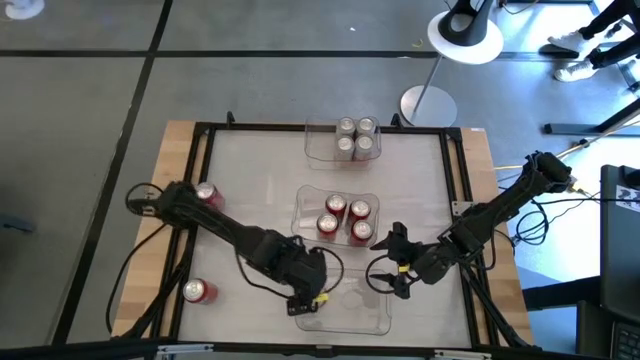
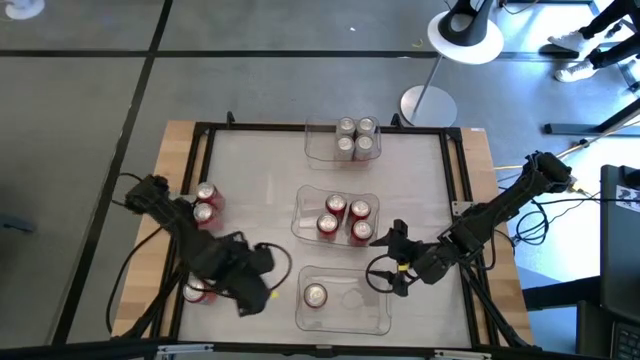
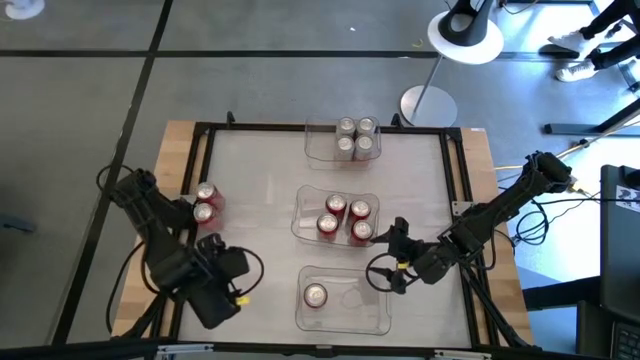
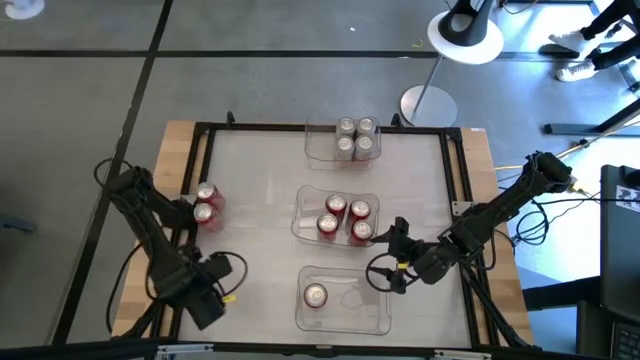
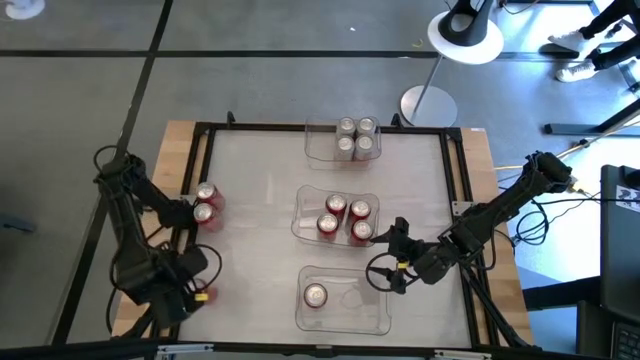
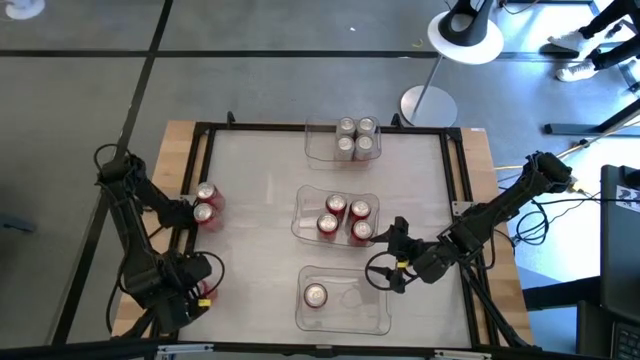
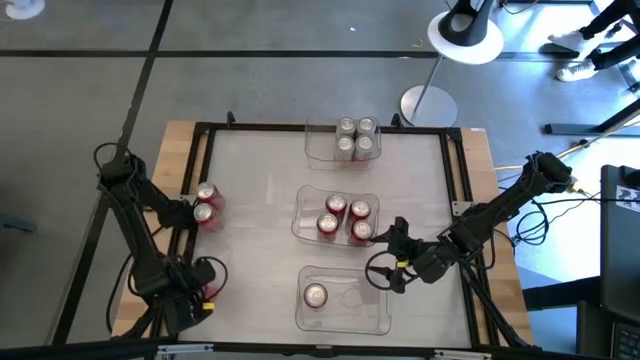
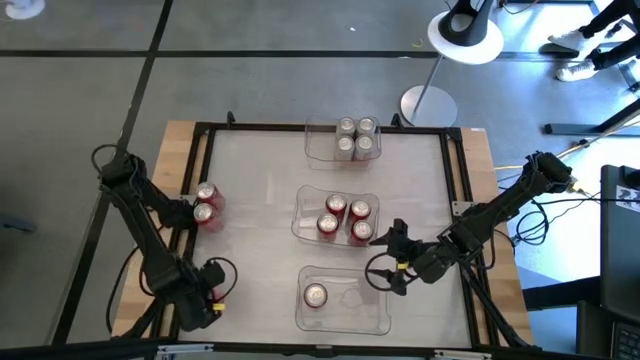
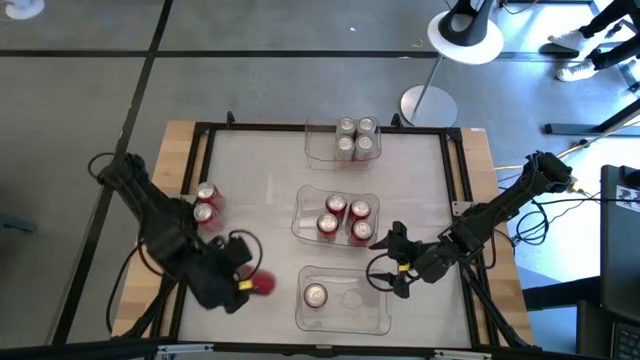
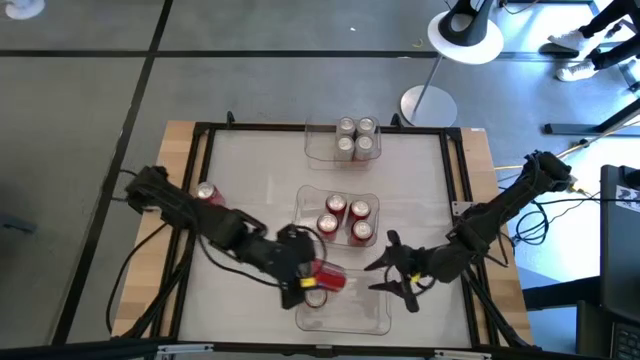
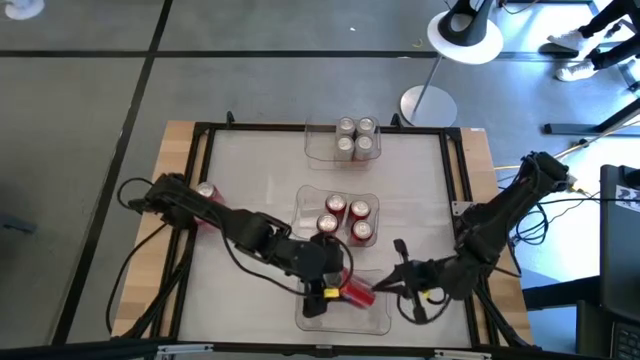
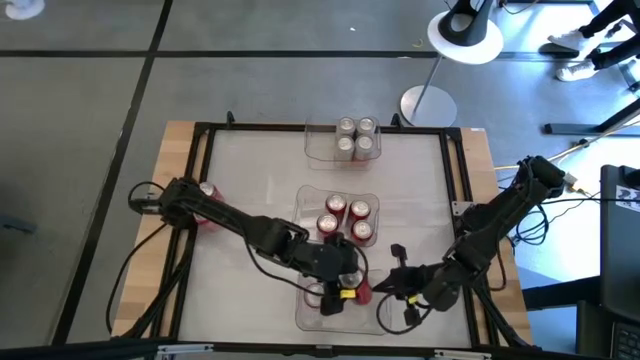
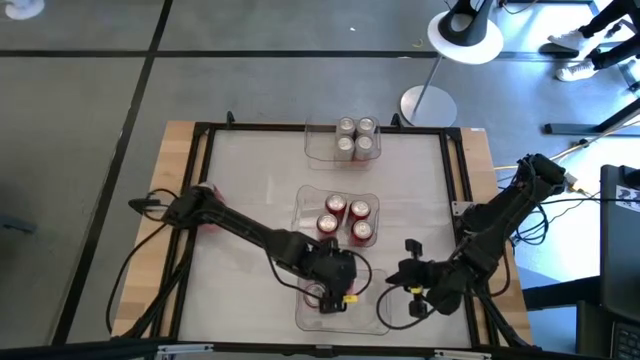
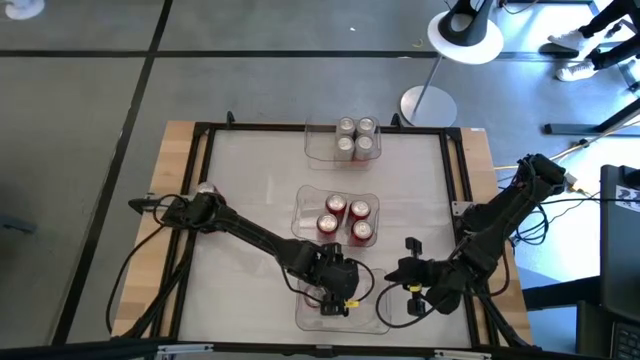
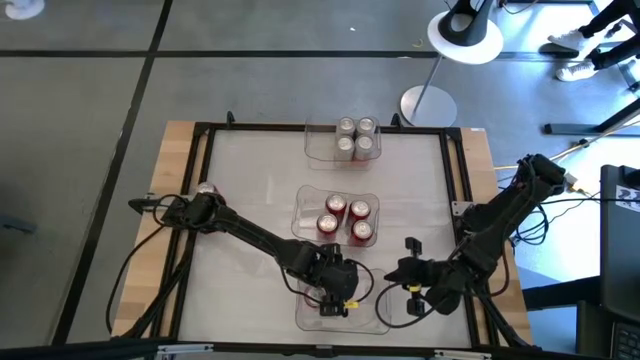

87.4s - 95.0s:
Task: Sort soda cans
Put the bottom red soda can into the bottom transparent bin

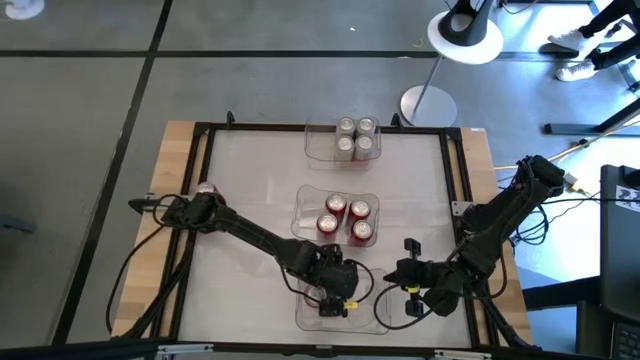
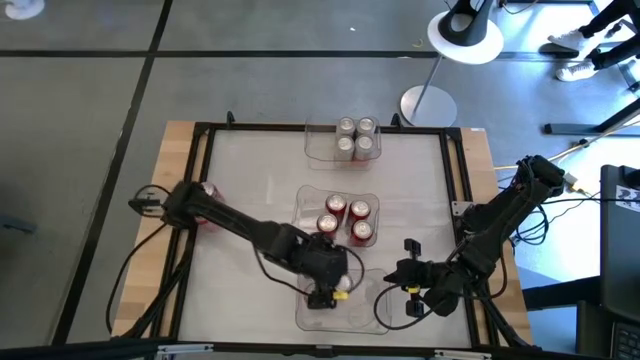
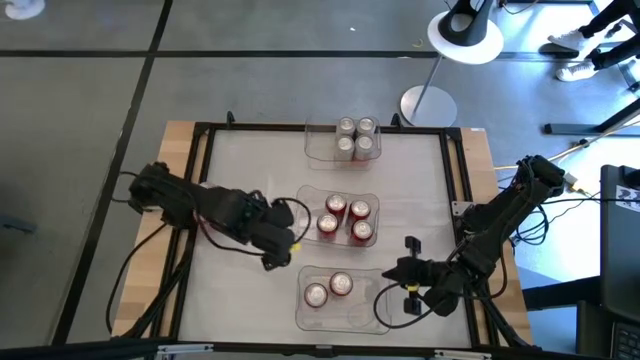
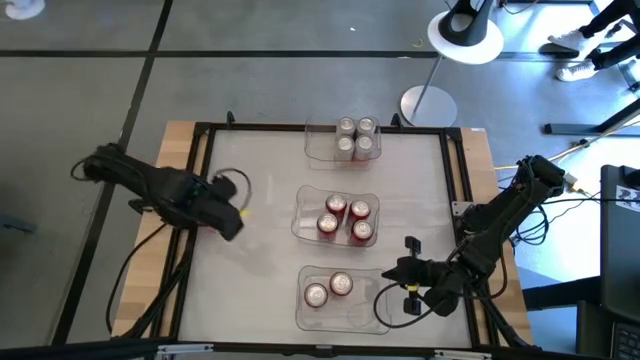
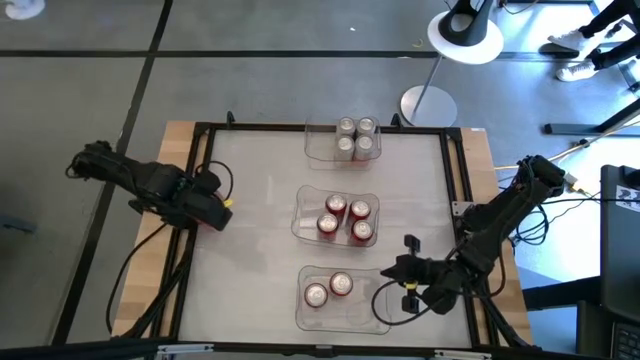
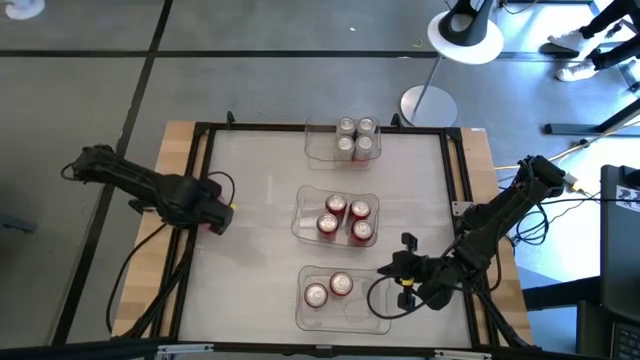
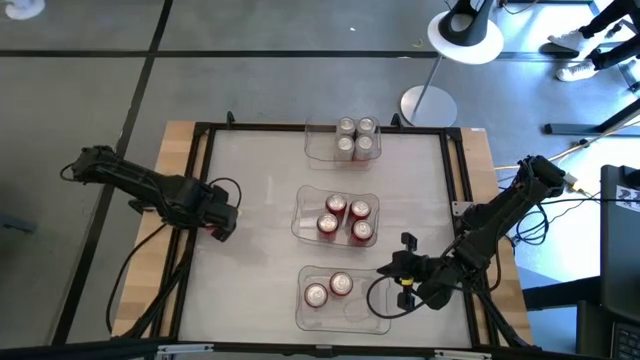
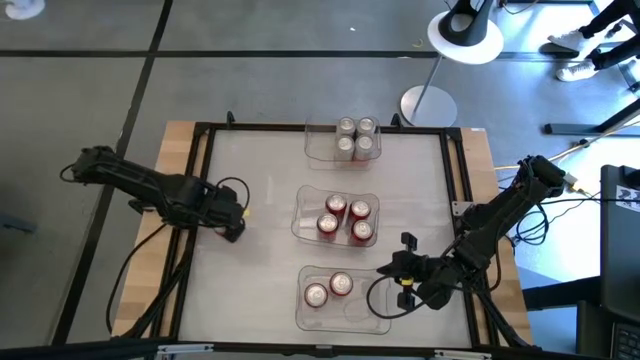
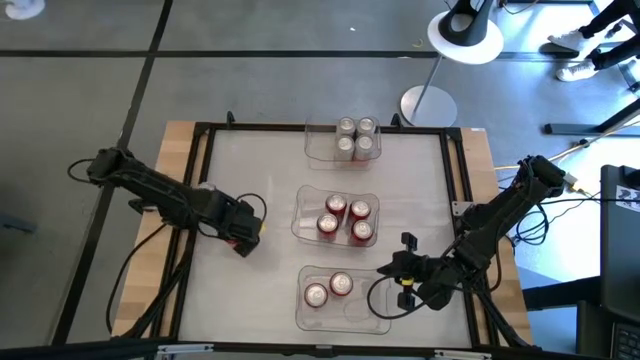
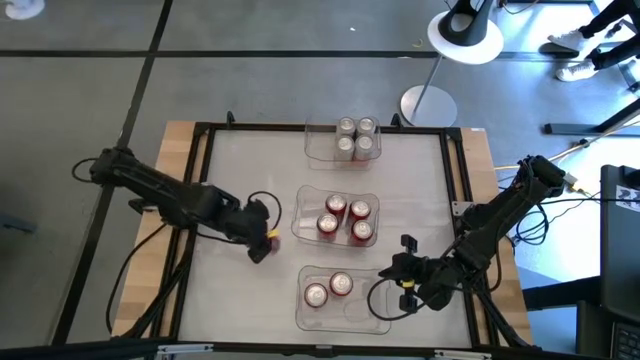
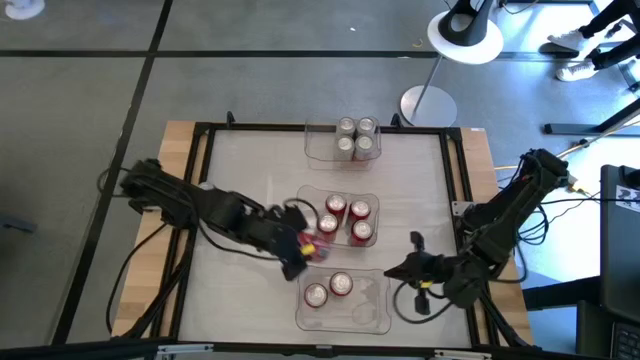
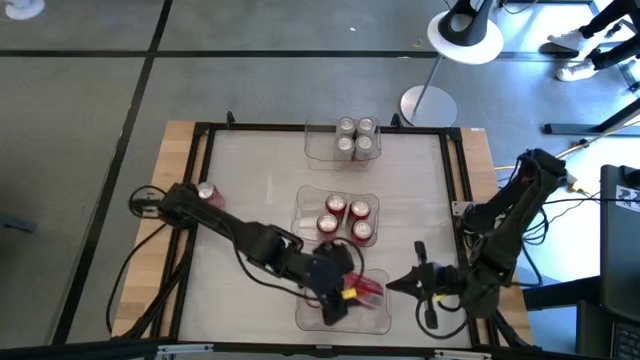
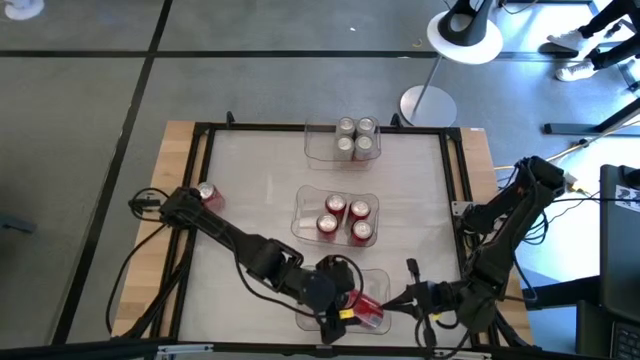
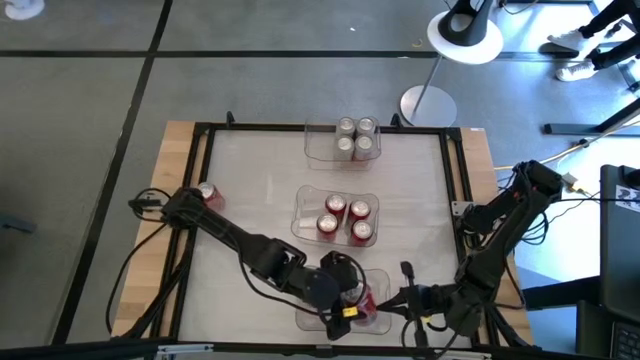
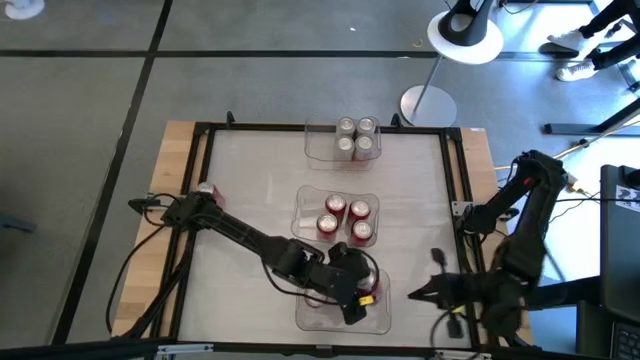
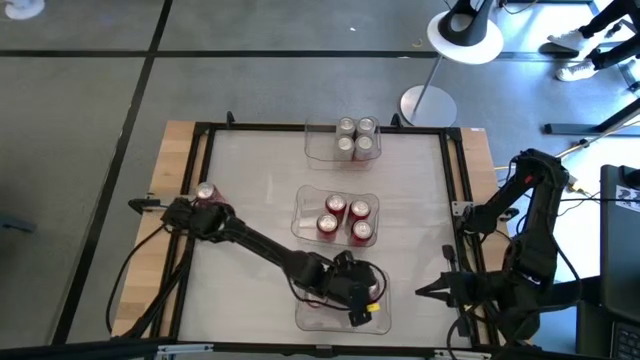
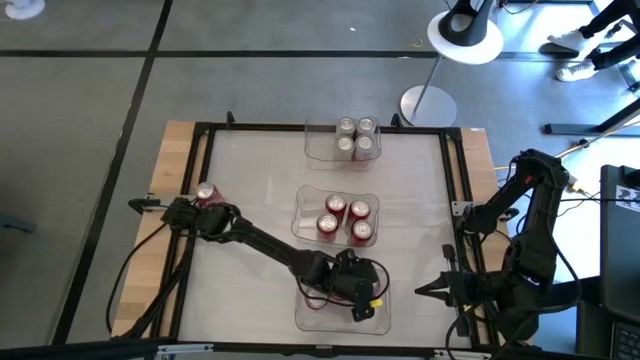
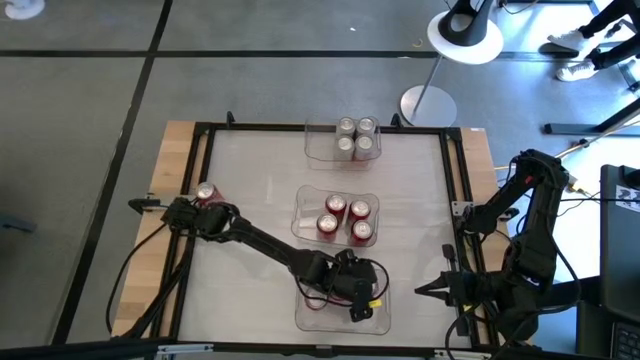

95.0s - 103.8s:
Put the bottom red soda can into the bottom transparent bin

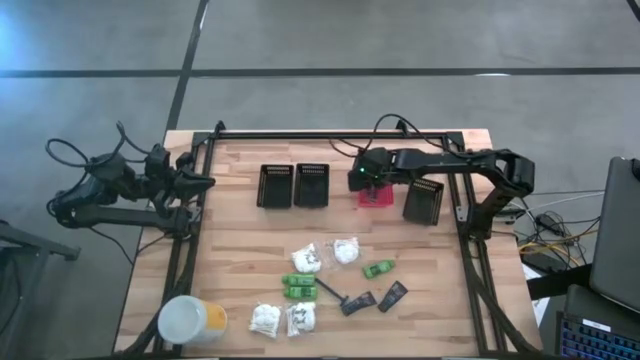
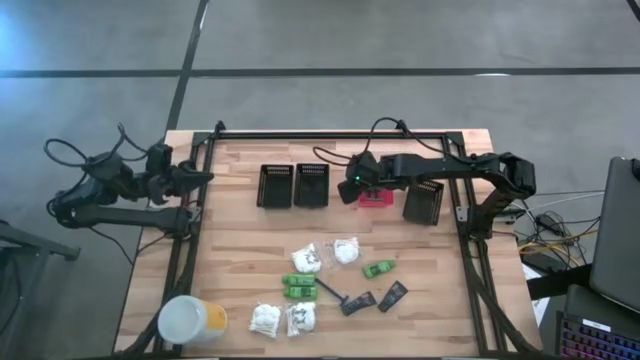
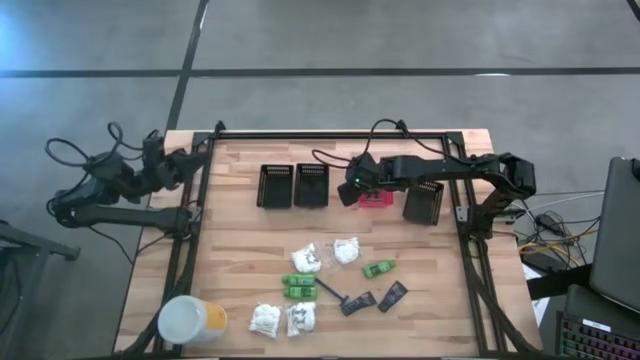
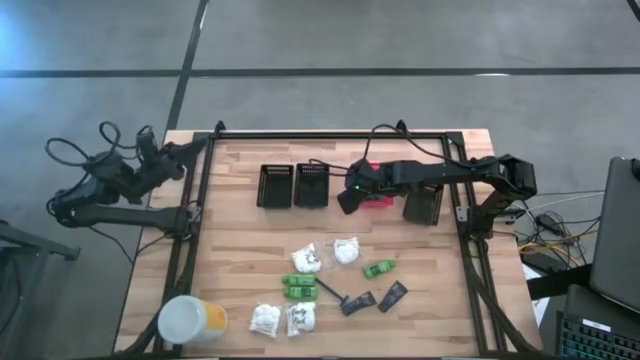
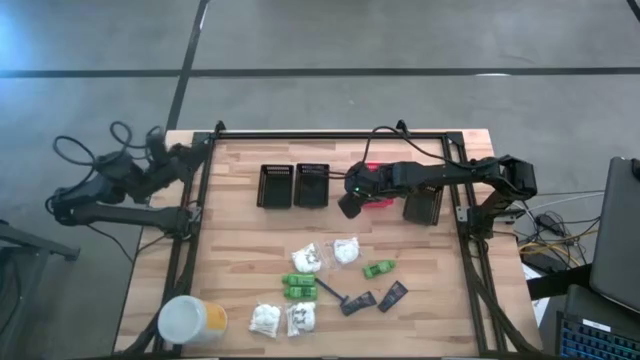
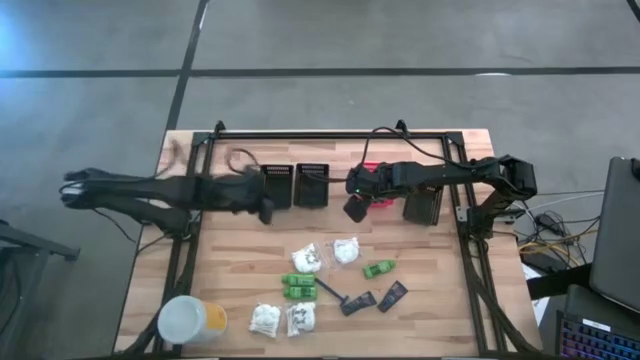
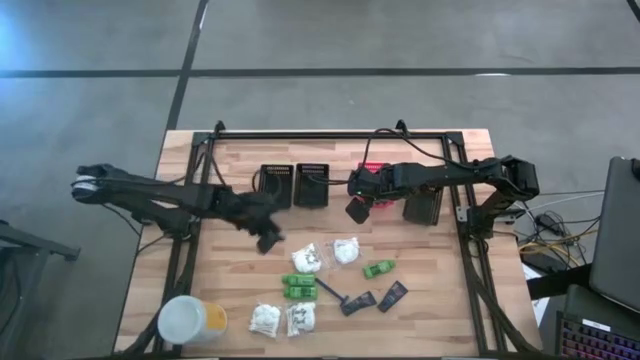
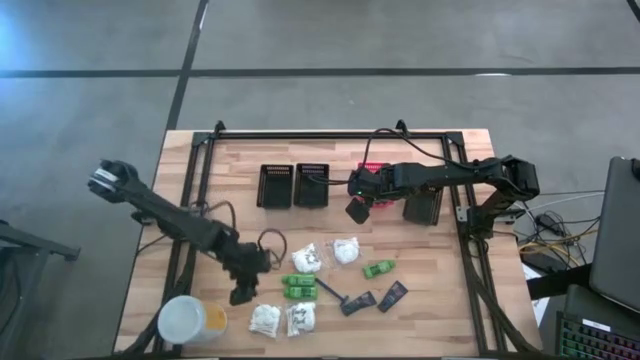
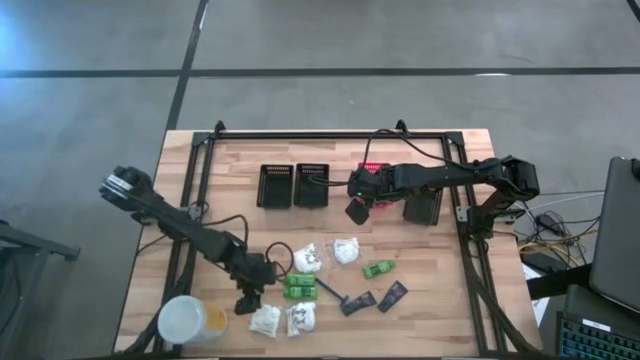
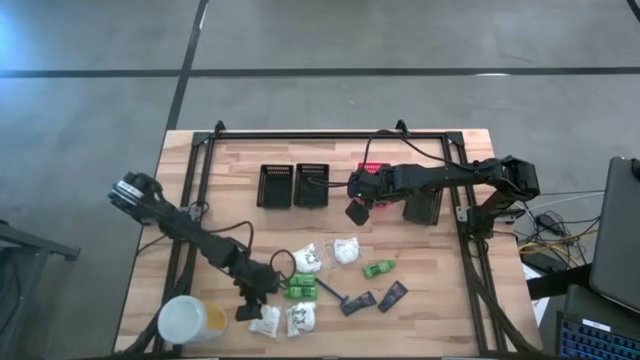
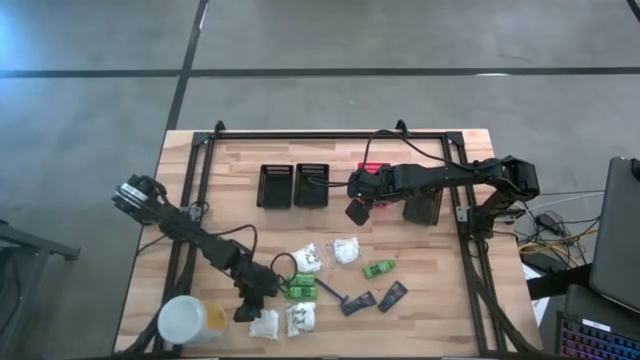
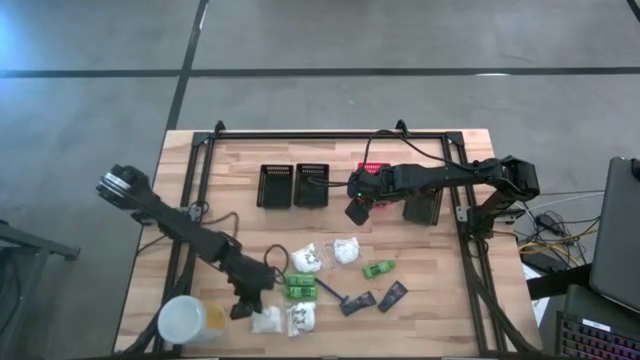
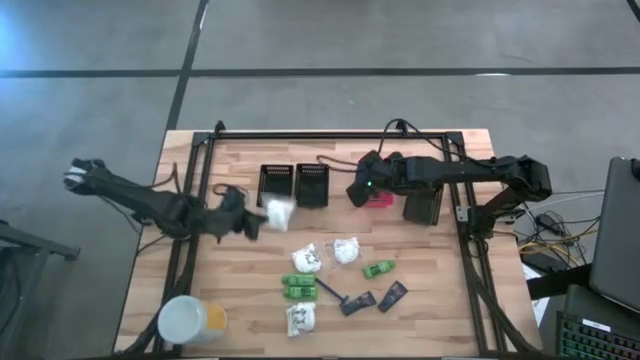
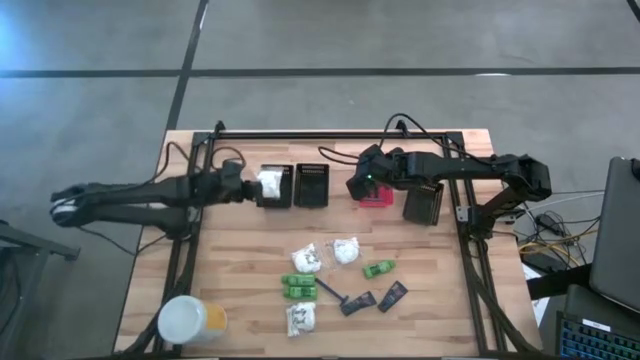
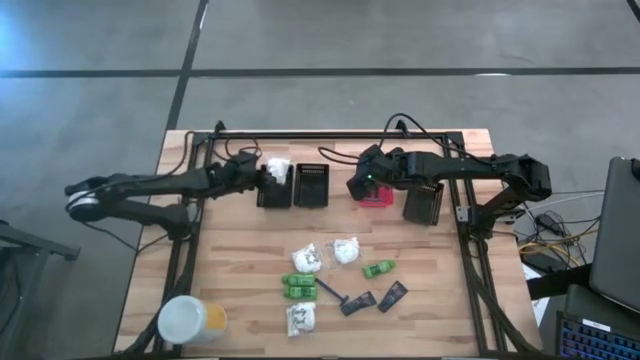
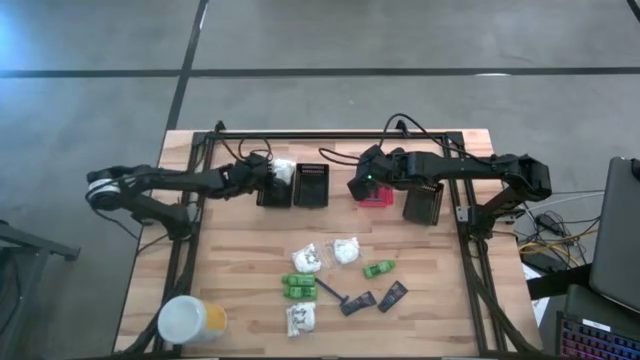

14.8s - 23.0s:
Task: Pick & Place Travel size toiletries
Put the white cotton pack into the left black bin
